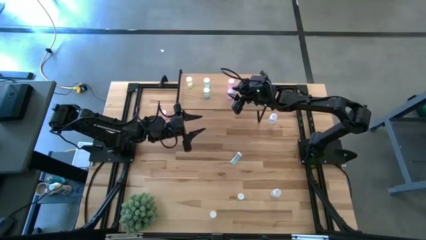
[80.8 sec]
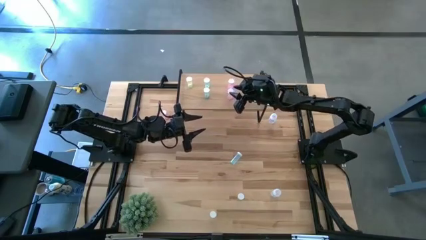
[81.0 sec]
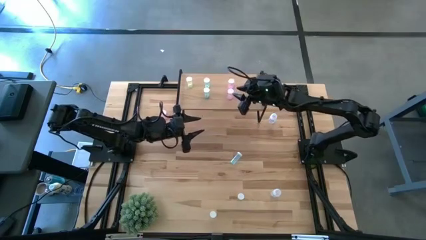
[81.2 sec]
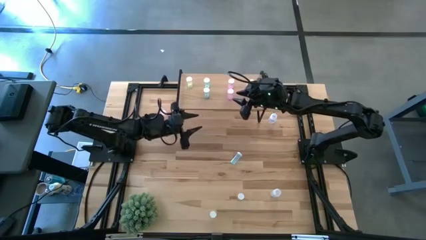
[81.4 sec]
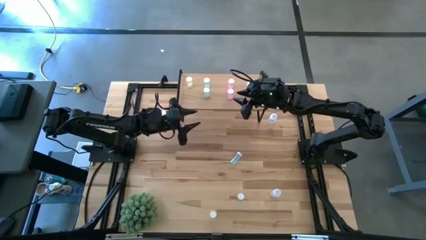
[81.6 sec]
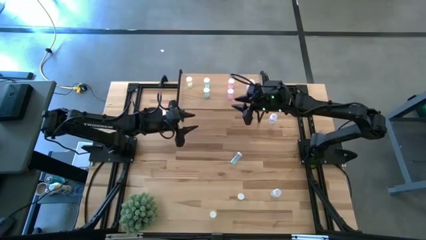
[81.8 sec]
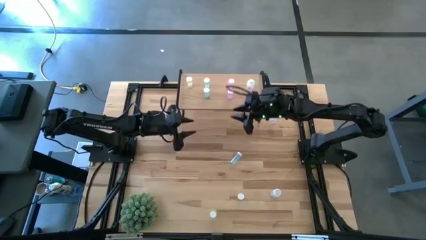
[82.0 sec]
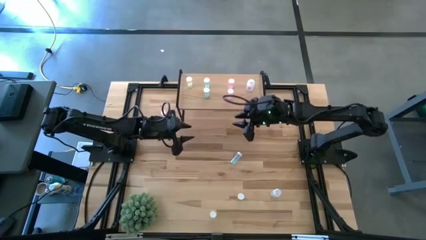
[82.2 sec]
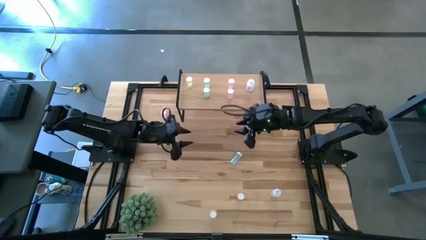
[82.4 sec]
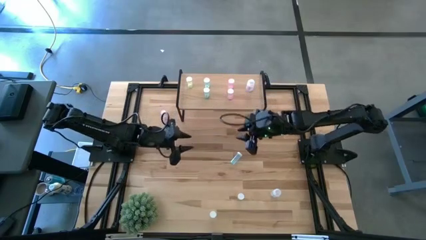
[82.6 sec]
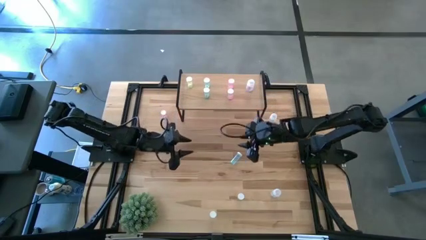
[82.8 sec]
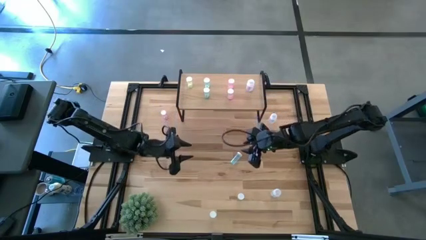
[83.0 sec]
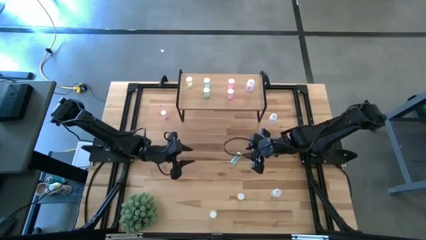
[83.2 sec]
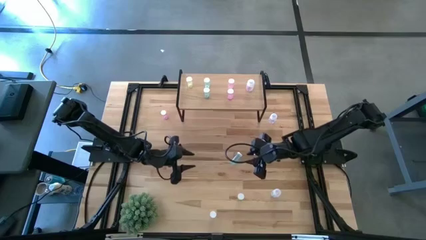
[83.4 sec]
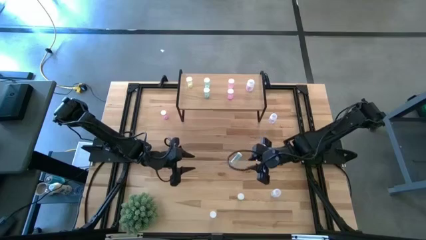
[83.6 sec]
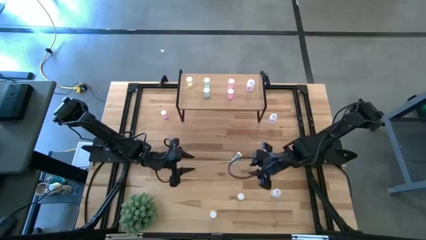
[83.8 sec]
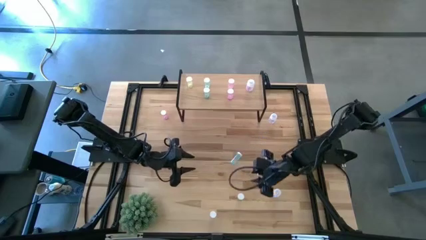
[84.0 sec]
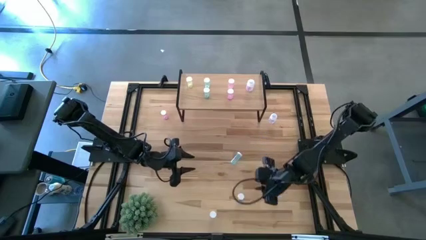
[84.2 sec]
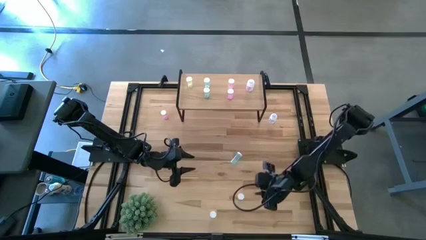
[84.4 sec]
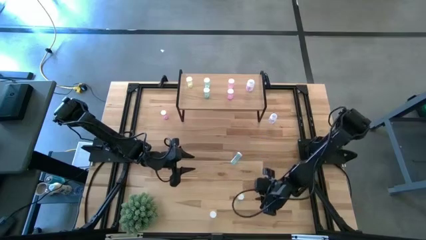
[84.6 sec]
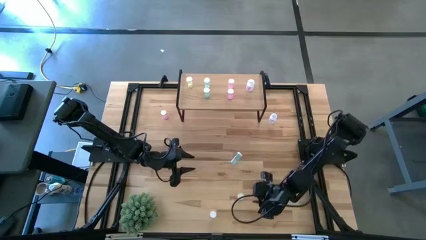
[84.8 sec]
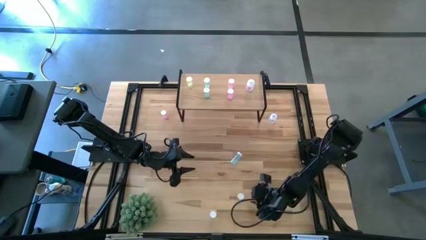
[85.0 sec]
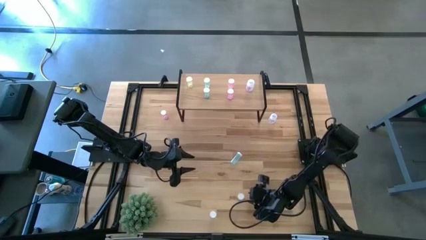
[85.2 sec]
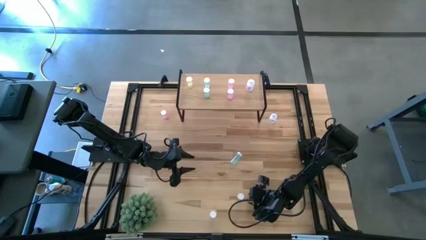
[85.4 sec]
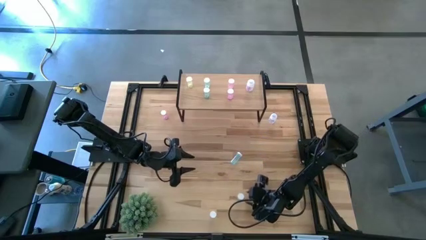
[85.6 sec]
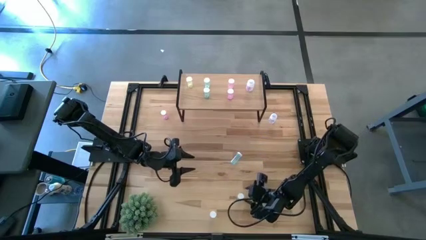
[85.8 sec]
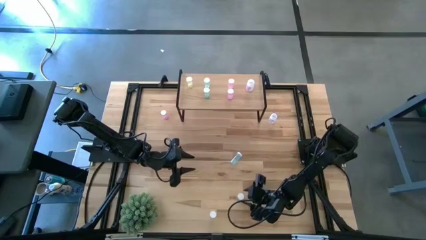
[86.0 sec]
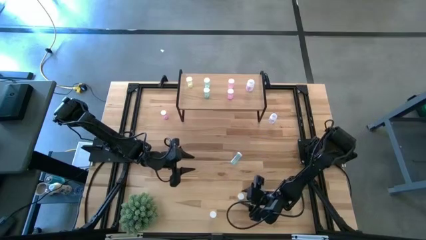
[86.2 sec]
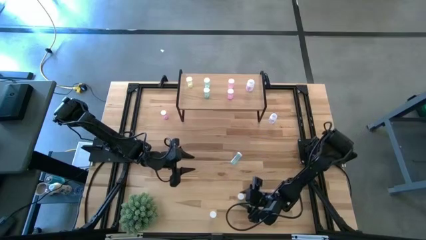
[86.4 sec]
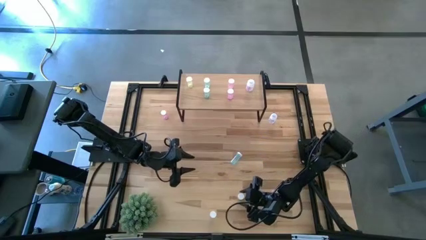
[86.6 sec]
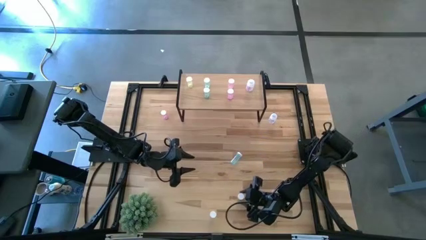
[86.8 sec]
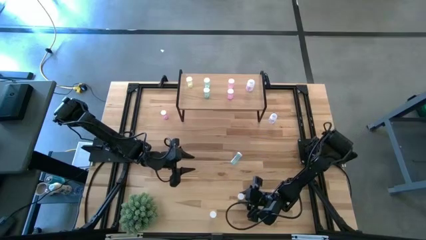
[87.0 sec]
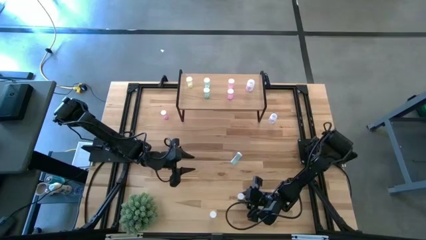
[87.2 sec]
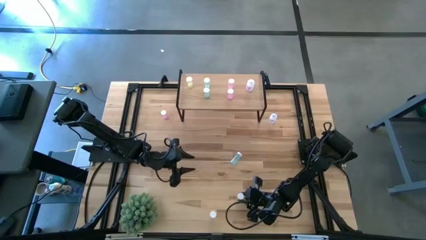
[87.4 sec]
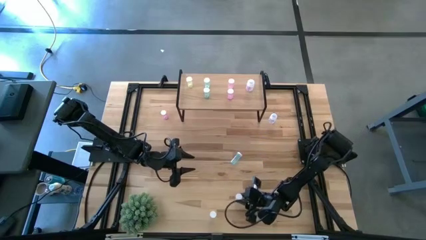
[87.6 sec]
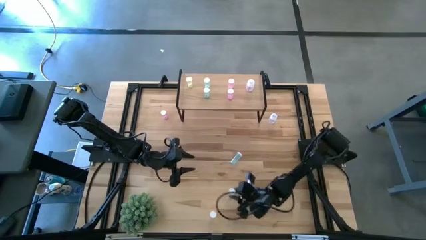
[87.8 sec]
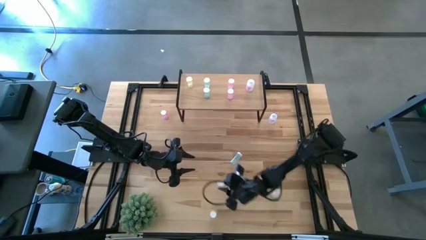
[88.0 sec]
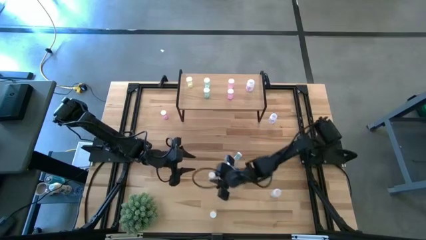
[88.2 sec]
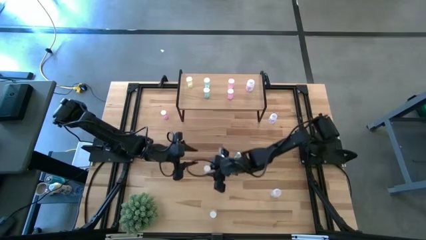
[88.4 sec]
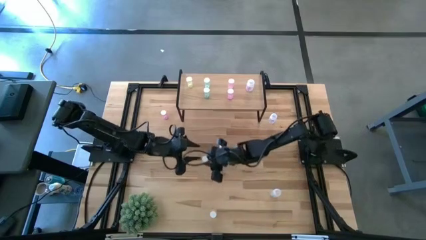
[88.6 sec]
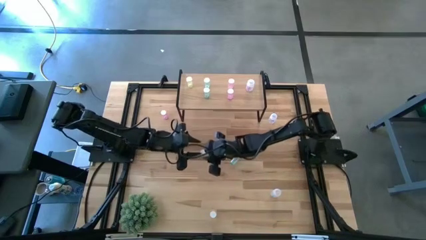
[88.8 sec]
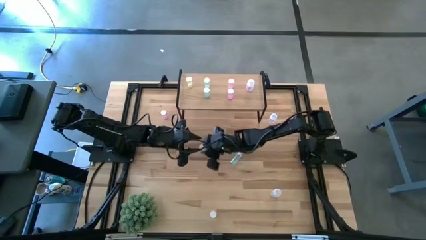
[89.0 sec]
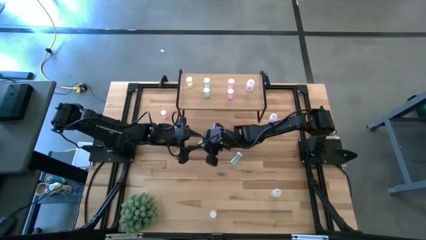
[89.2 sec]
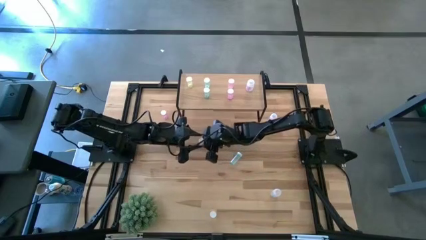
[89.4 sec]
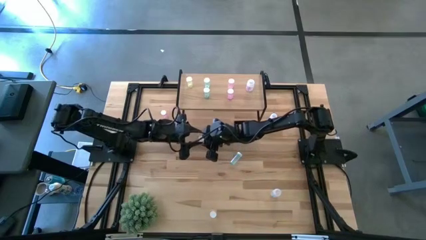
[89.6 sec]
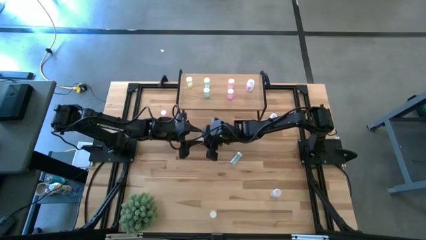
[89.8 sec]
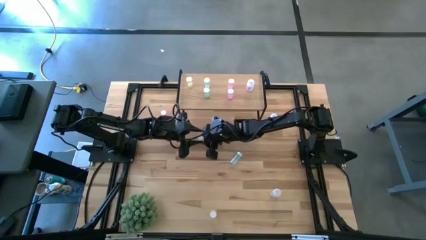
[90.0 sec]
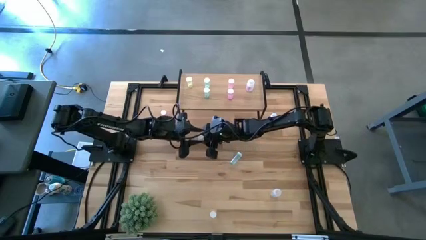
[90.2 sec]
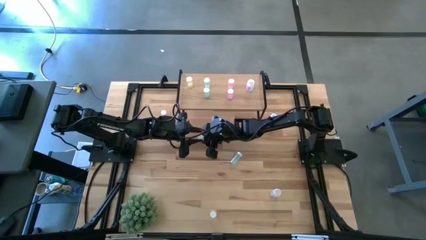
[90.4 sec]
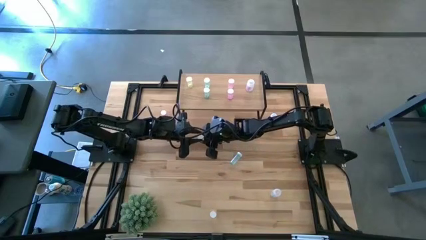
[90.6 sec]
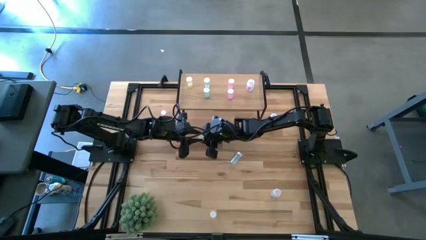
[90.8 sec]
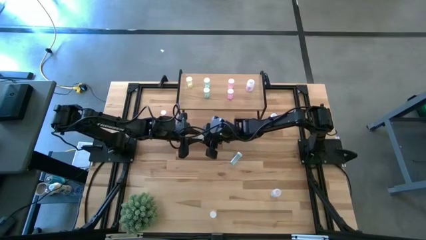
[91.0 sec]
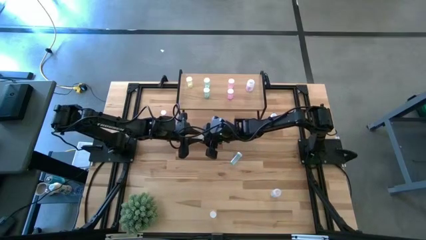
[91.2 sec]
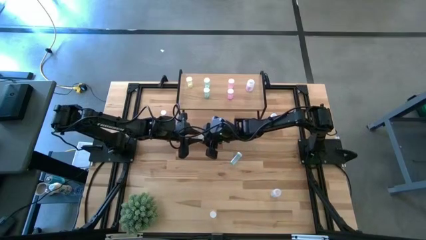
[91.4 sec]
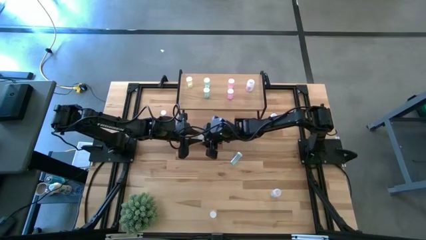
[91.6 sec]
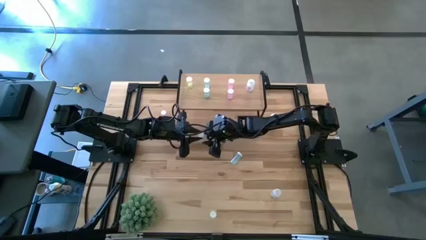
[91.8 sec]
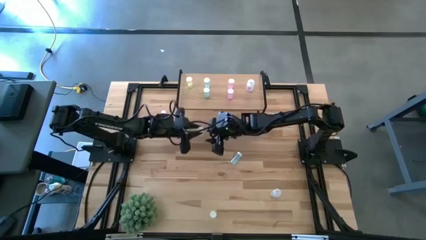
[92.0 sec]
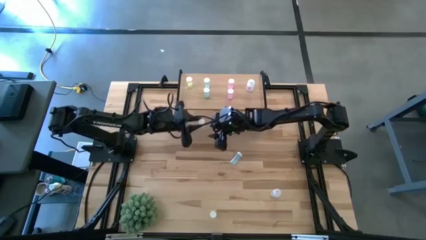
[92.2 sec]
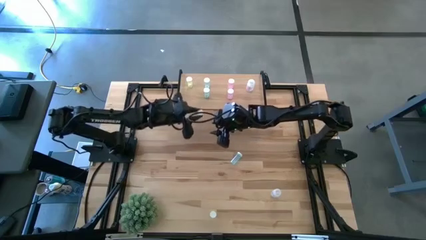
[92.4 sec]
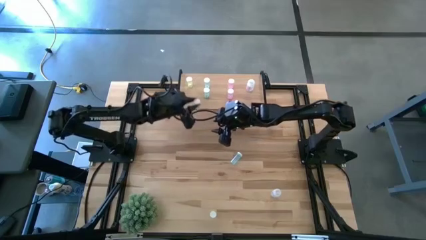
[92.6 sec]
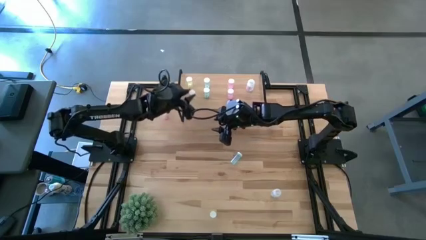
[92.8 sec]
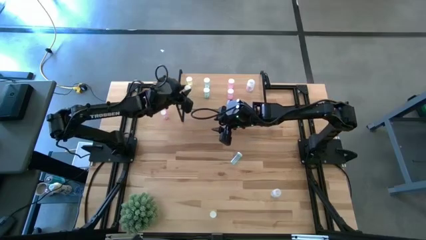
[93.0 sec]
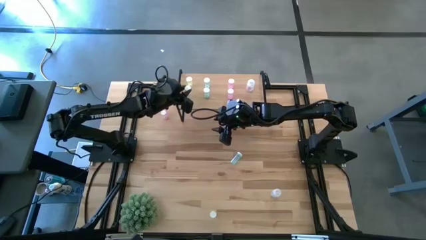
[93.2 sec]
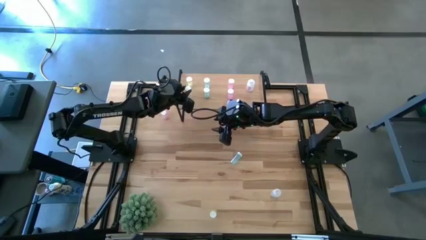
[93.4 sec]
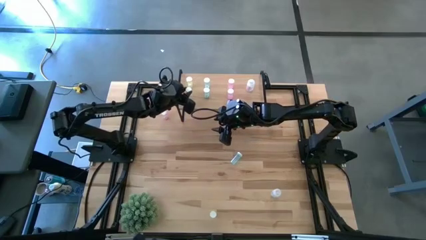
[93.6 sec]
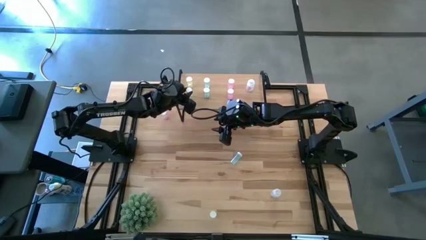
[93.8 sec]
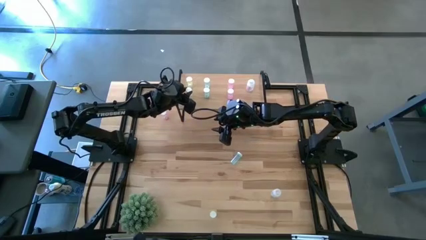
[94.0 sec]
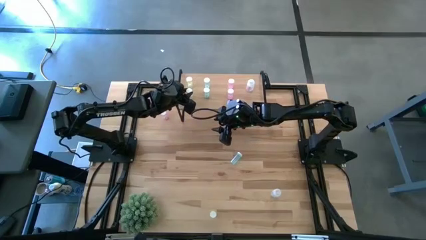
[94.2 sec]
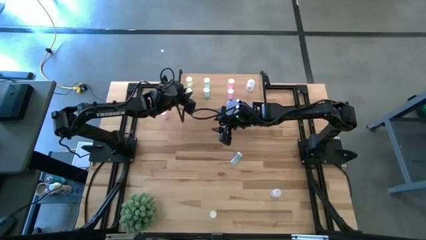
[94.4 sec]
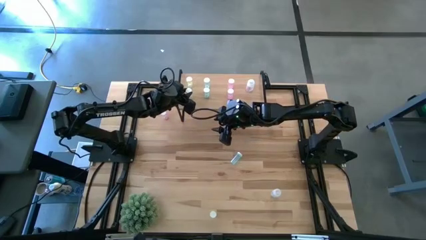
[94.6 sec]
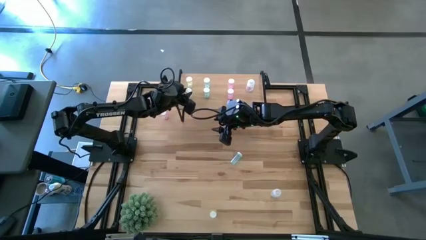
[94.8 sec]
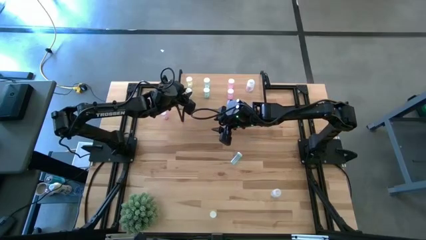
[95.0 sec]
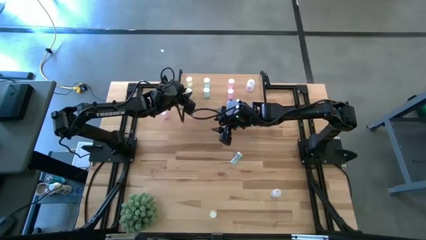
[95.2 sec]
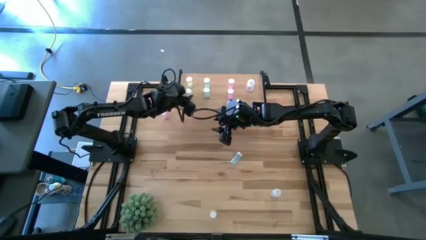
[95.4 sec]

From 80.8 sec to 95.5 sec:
Task: Pick and place medicine bottles onto shelf by color
Put the right yellow pill bottle and align it with the other yellow pill bottle on the shelf
